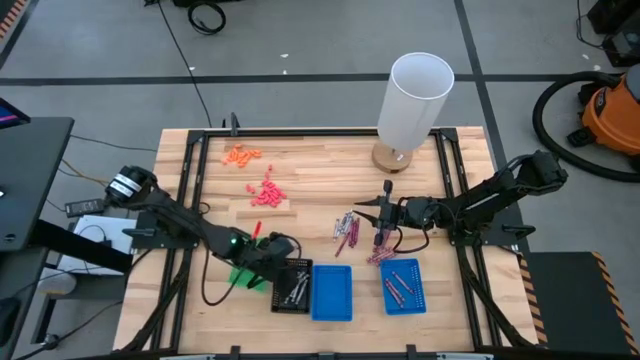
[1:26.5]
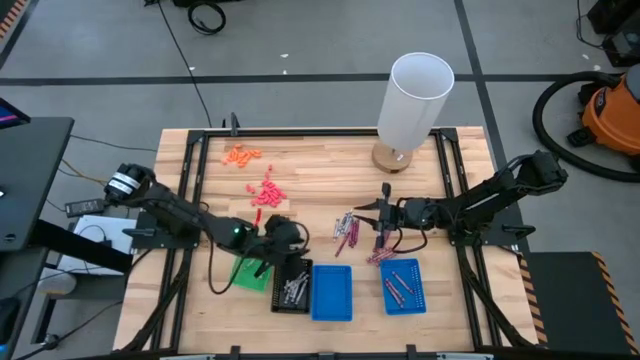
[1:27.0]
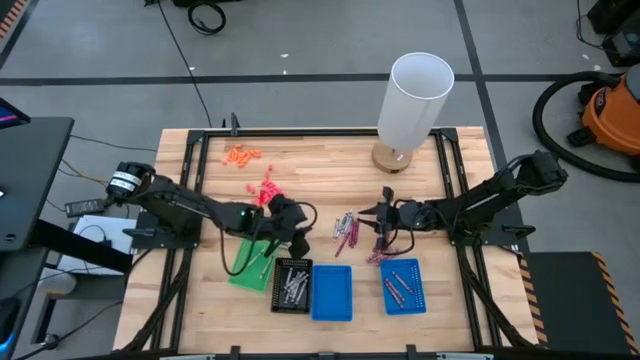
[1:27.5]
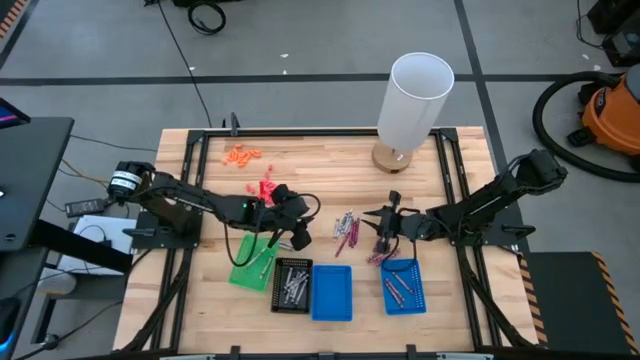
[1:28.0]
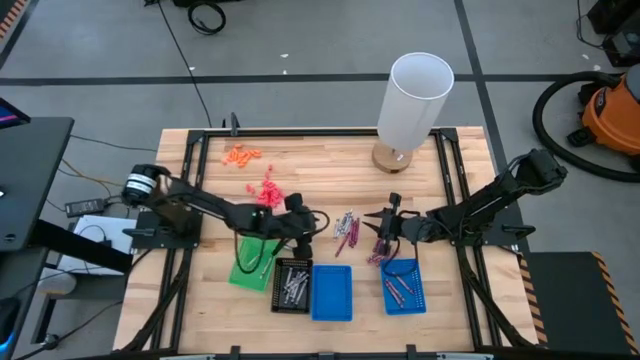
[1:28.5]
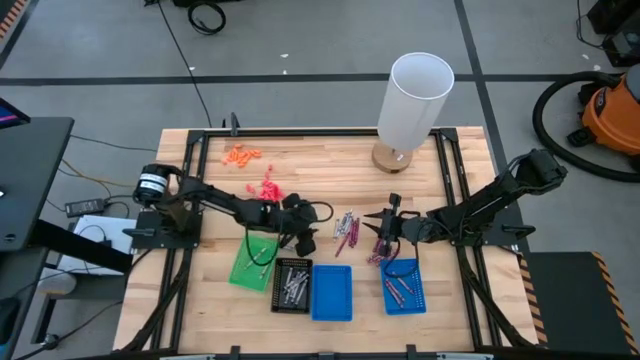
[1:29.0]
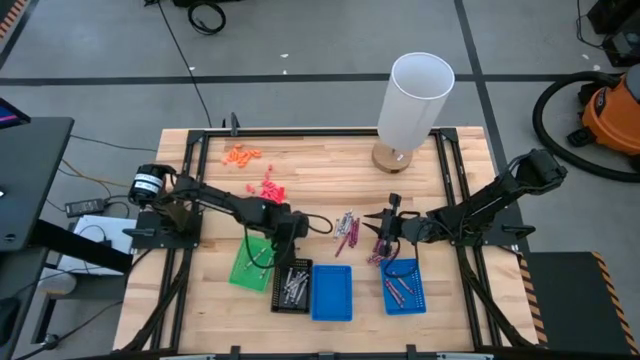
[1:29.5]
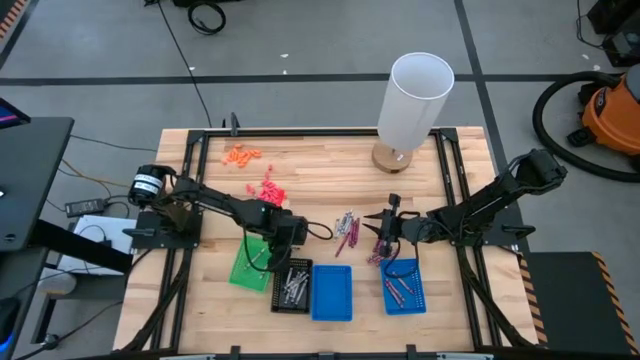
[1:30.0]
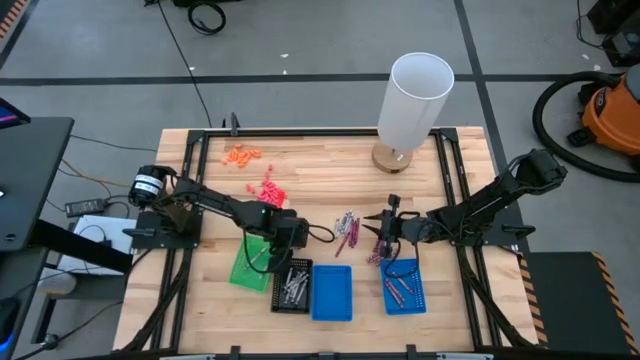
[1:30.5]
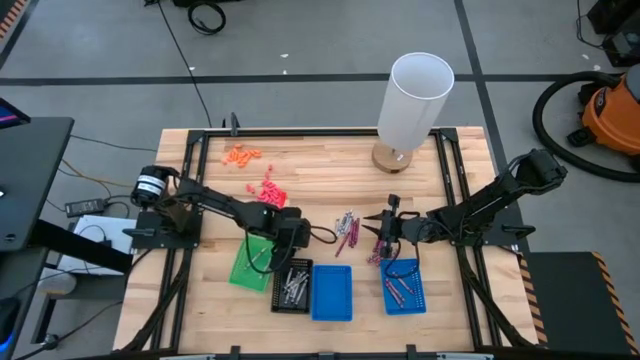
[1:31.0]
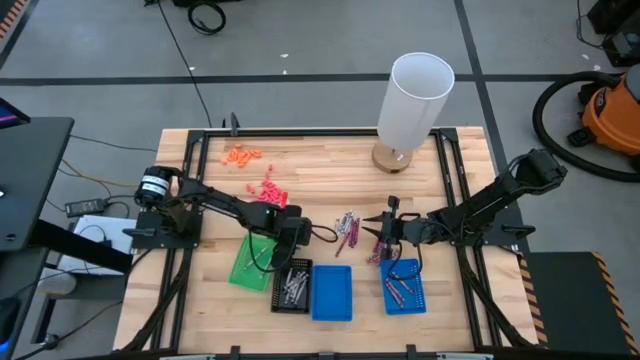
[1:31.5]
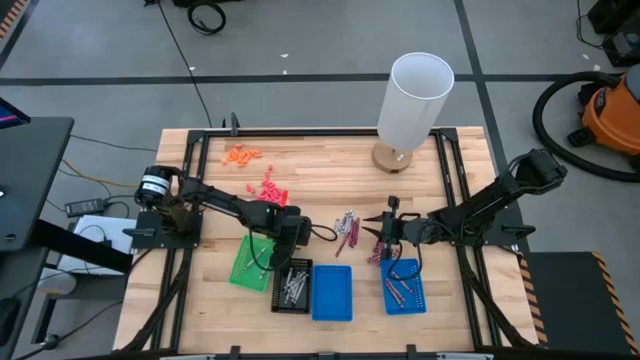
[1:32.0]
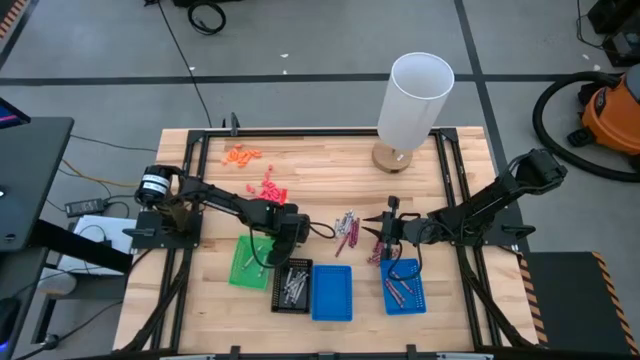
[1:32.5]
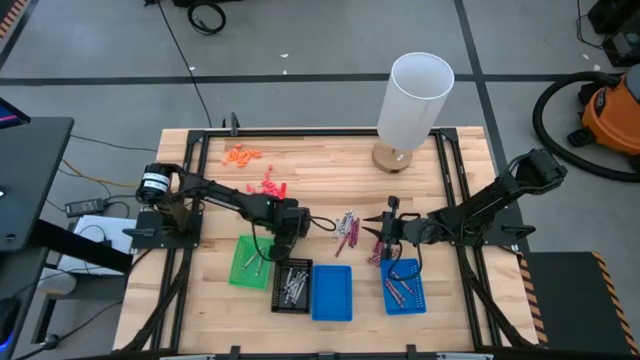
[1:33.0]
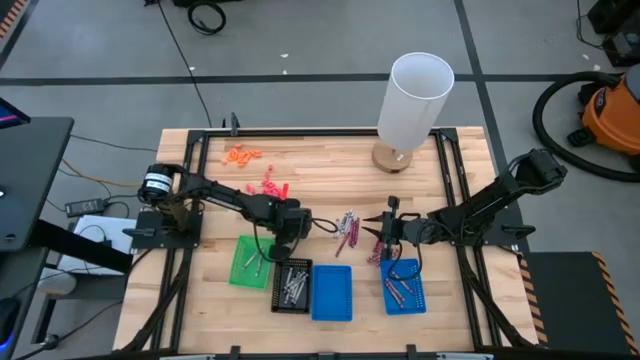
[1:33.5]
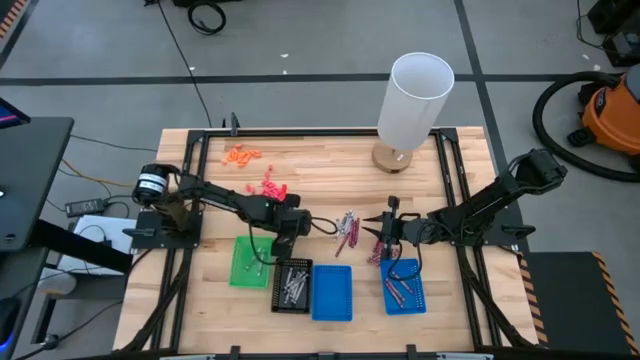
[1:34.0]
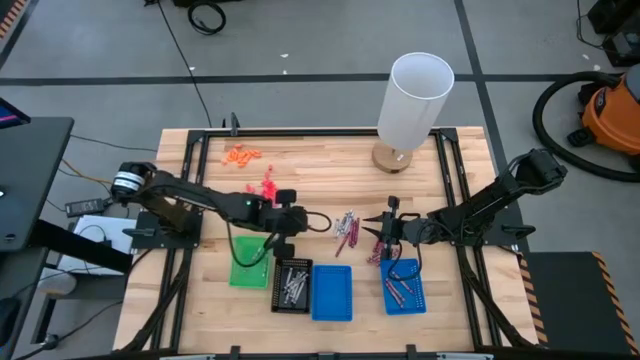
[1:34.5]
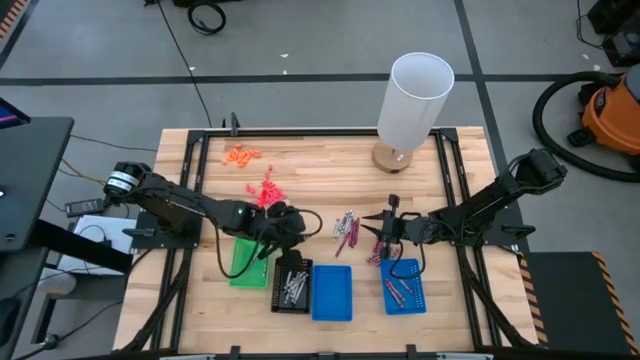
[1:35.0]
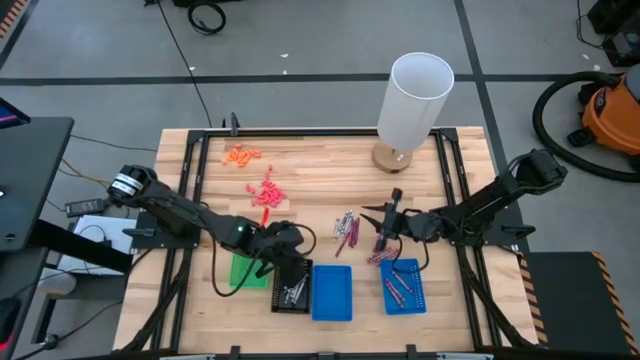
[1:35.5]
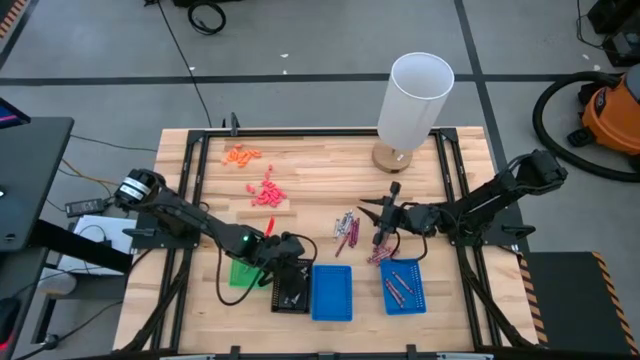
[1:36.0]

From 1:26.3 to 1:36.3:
Task: Sort crayons
Put the black crayon into the black bin

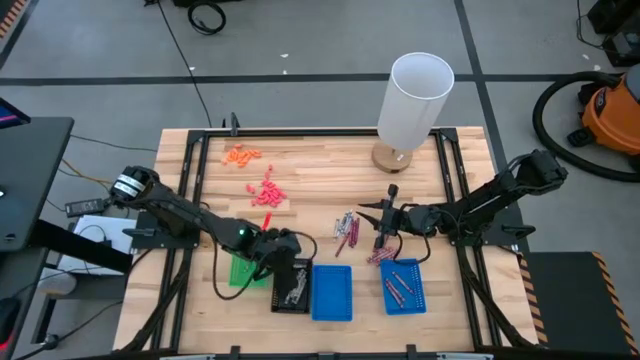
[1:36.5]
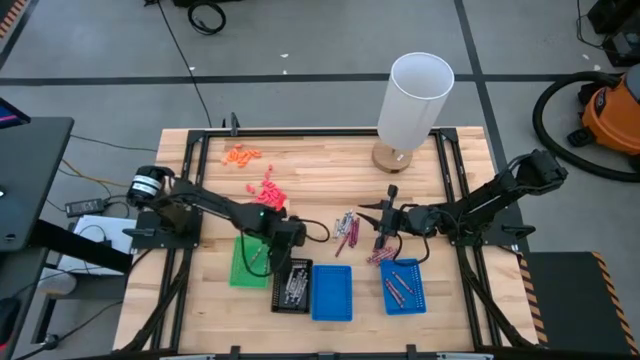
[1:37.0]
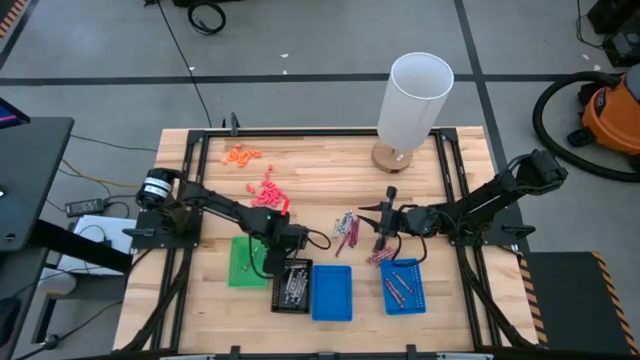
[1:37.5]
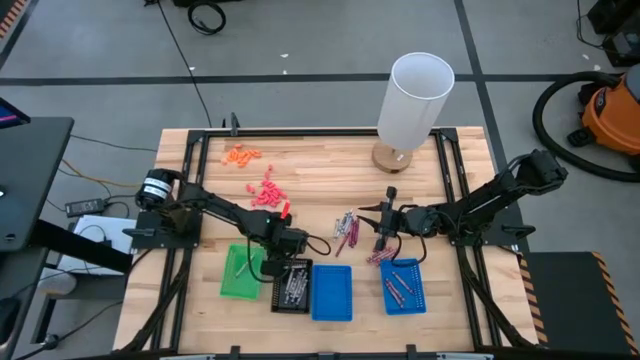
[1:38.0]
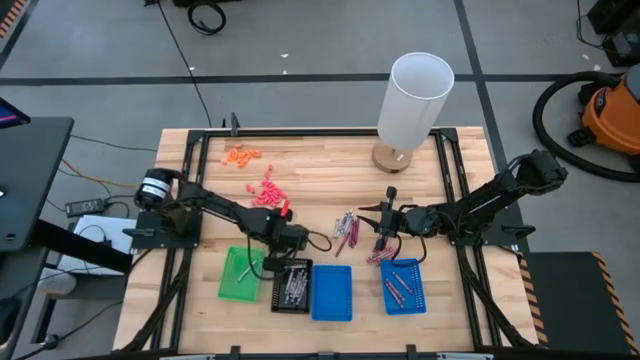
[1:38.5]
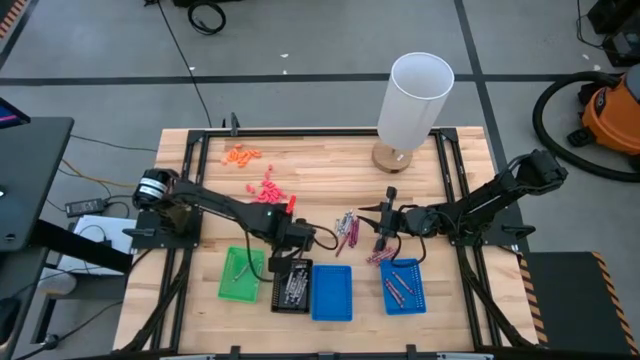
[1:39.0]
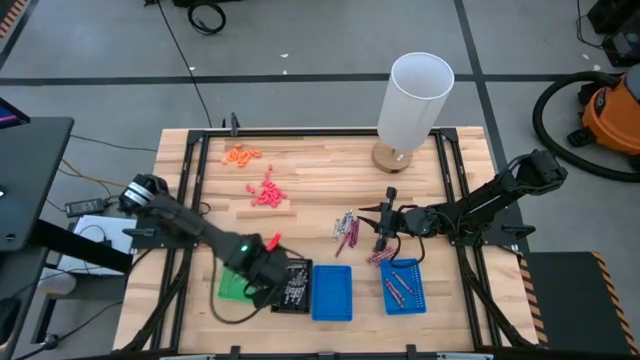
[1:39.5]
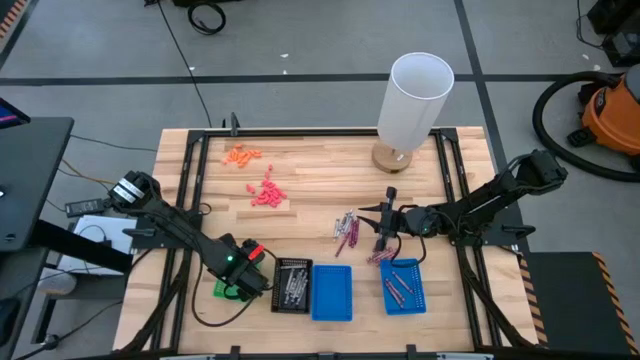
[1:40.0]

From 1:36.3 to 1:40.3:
Put the white crayon into the green bin

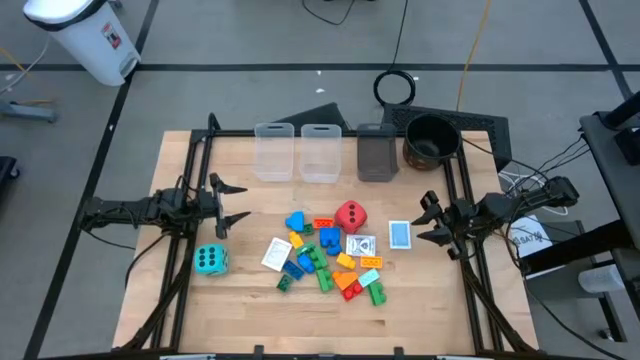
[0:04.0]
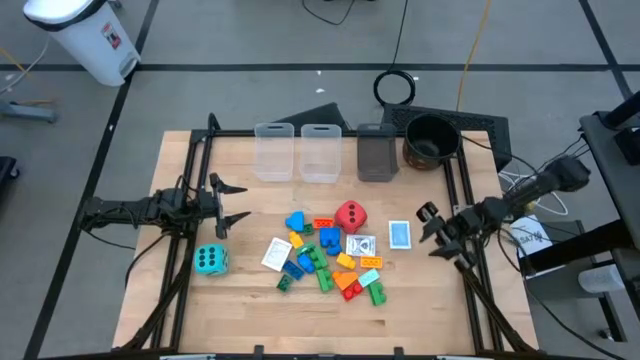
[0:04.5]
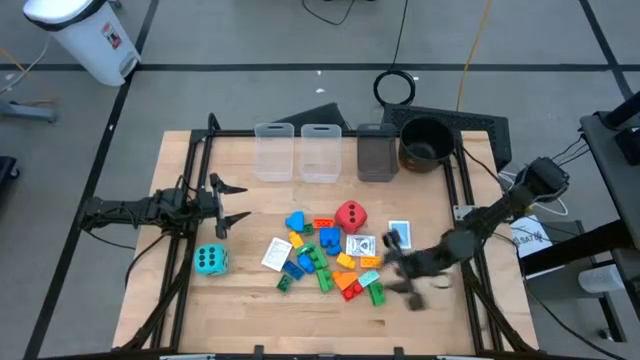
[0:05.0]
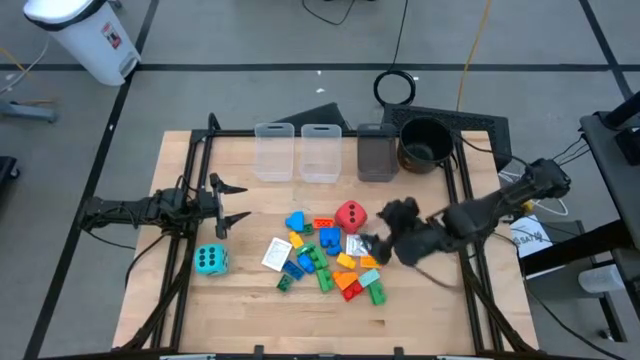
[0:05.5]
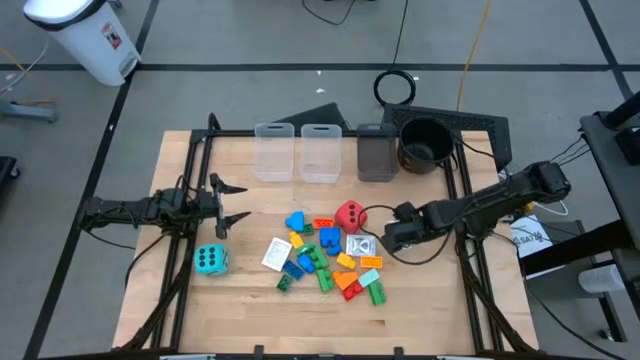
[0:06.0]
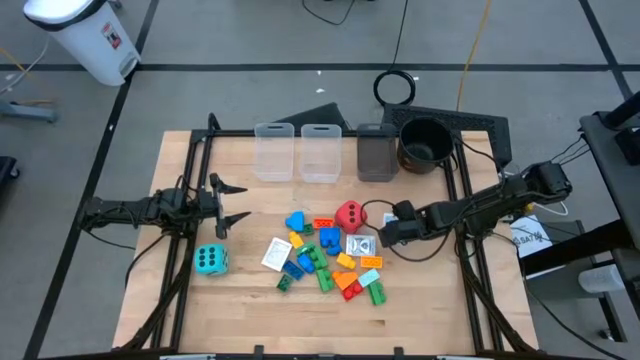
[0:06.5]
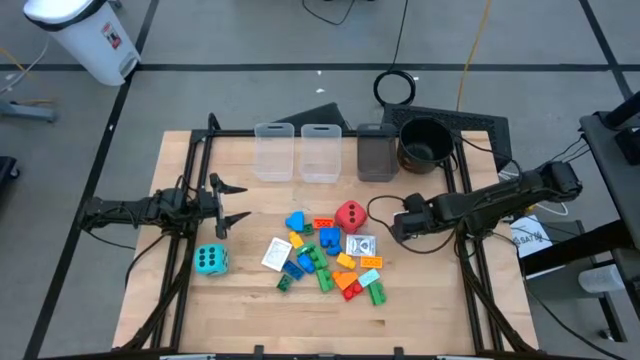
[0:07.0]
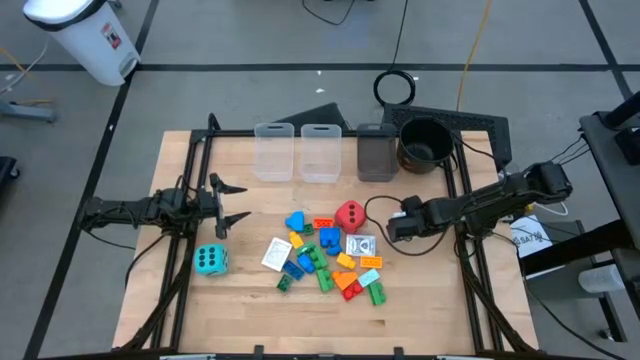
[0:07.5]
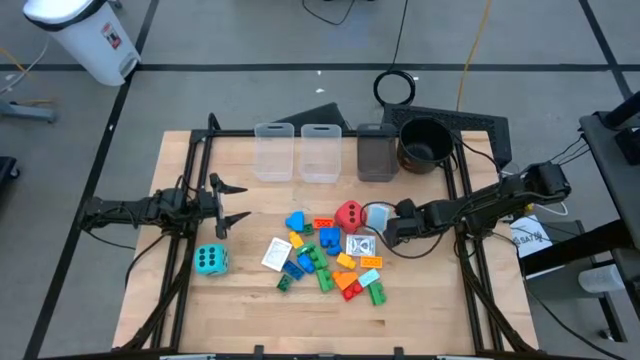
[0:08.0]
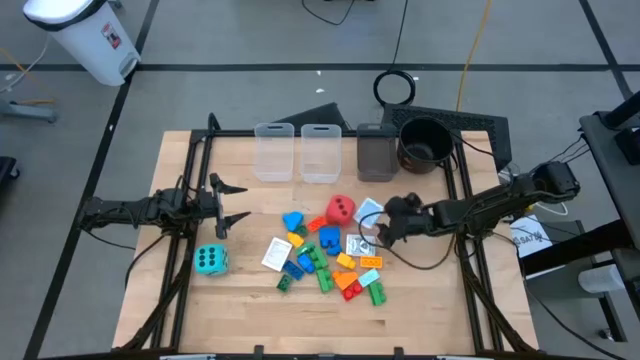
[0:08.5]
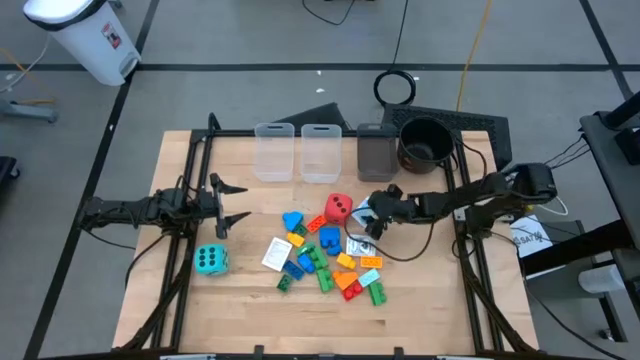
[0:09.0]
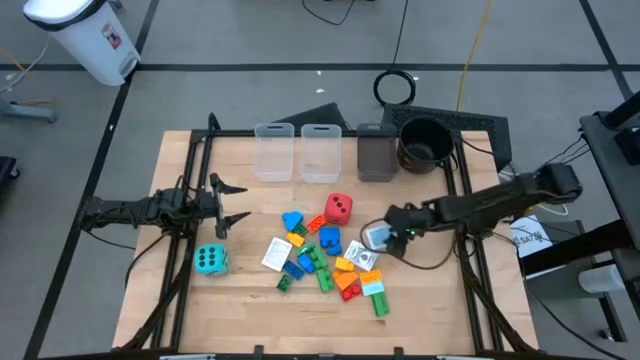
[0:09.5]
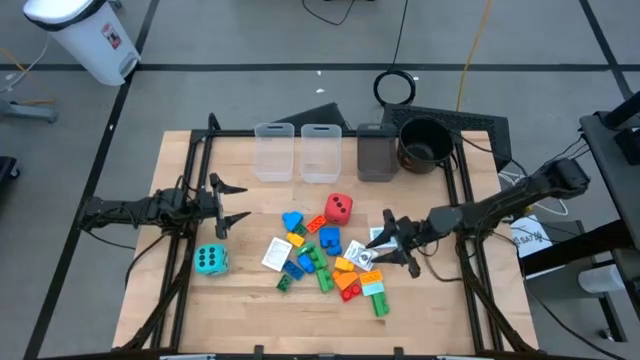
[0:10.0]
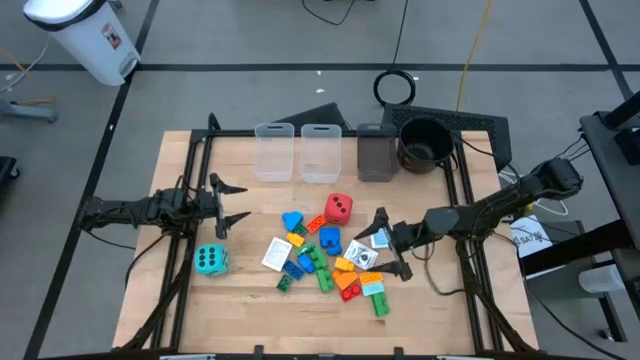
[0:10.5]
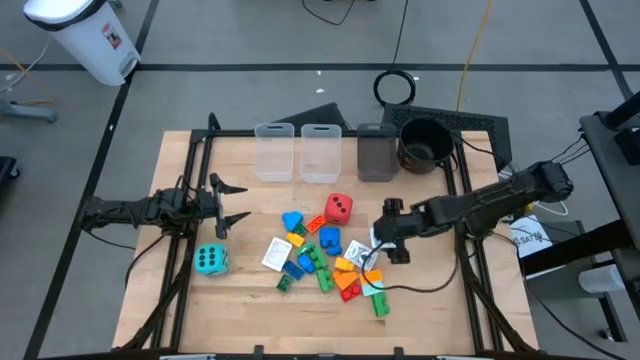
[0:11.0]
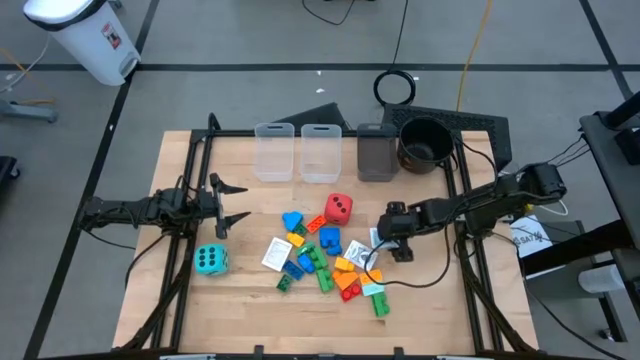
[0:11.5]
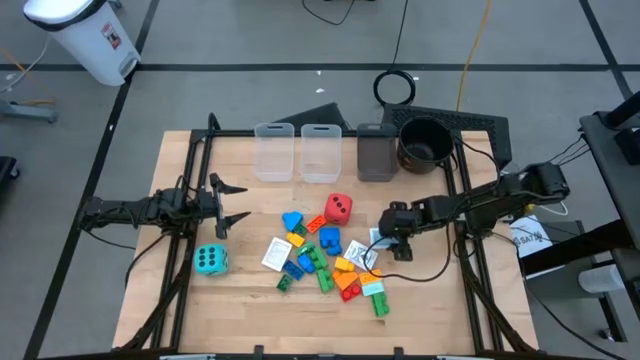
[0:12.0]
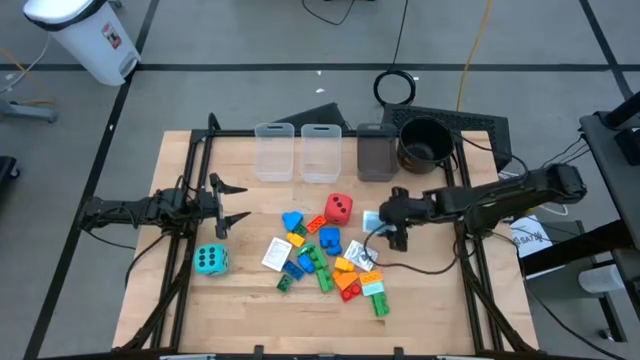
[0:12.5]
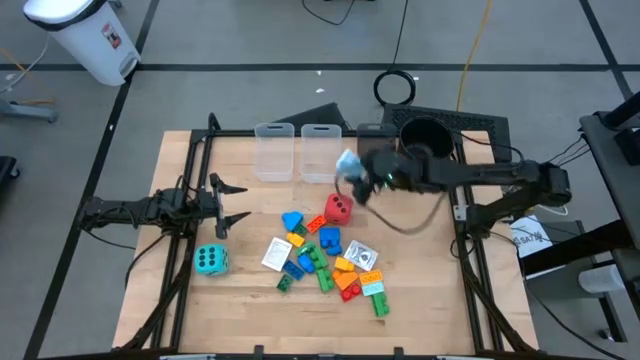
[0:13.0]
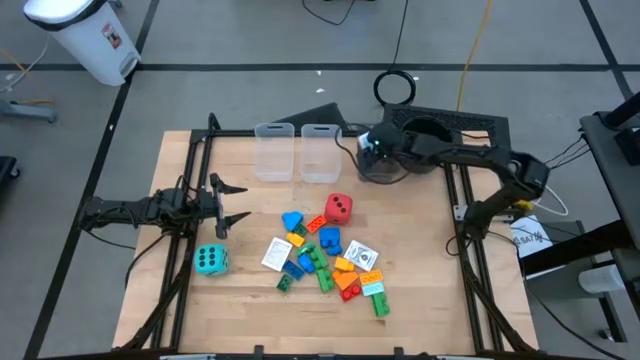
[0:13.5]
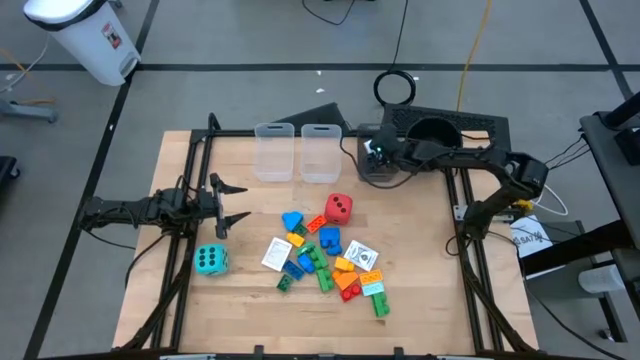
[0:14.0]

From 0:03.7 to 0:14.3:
Task: Pick & Place Toys
Put the blue deck of cards into the black bin
